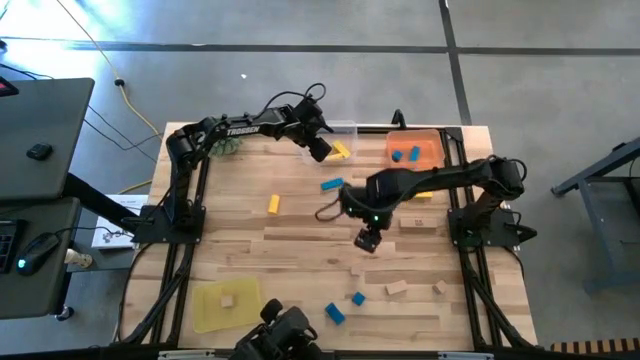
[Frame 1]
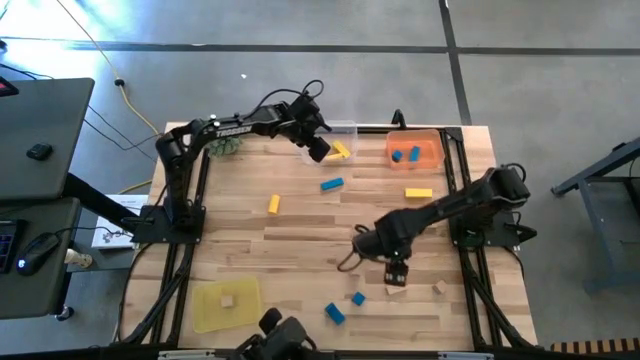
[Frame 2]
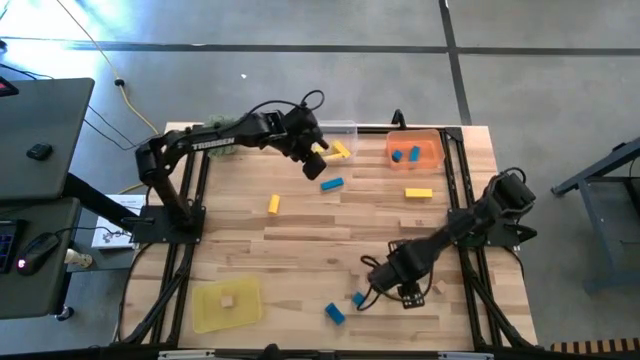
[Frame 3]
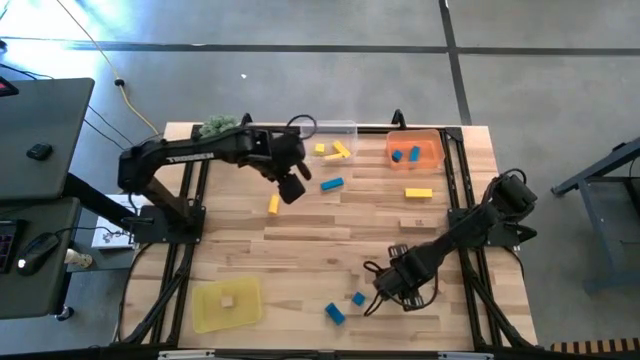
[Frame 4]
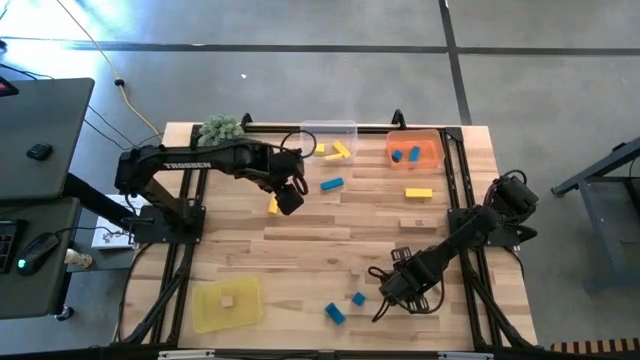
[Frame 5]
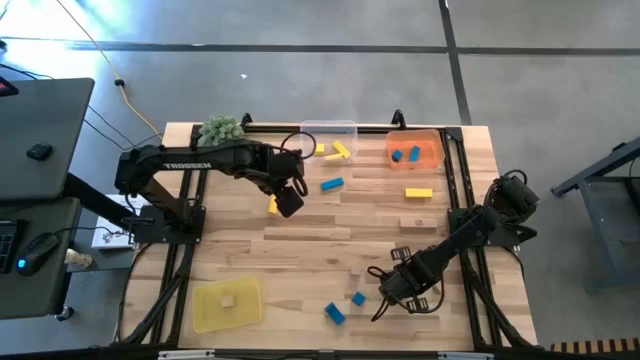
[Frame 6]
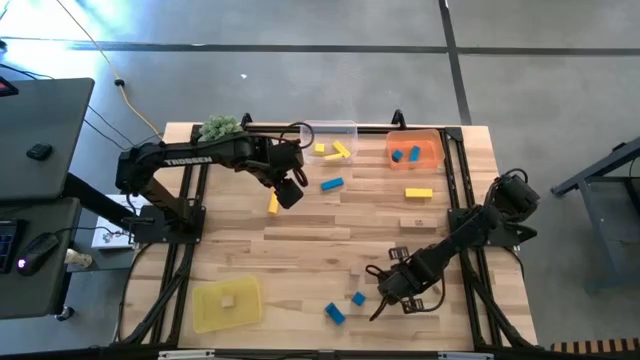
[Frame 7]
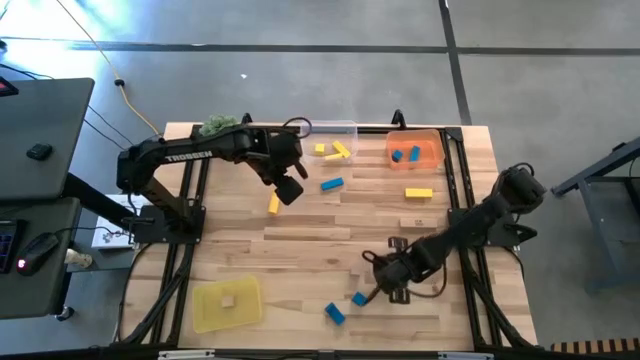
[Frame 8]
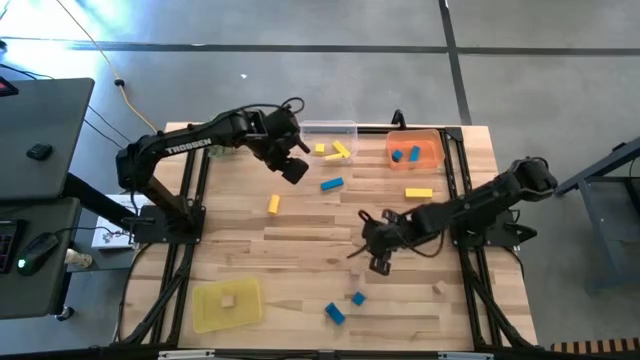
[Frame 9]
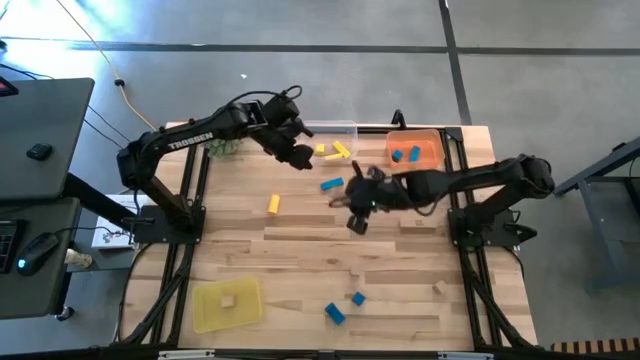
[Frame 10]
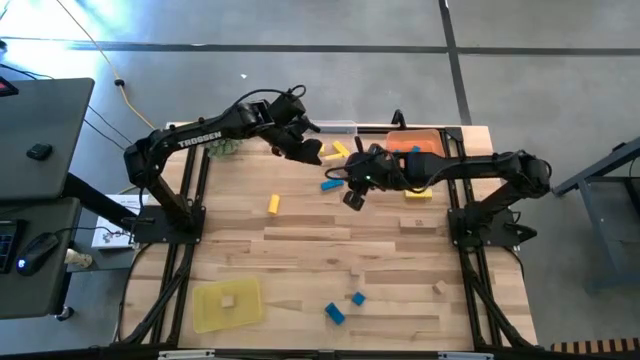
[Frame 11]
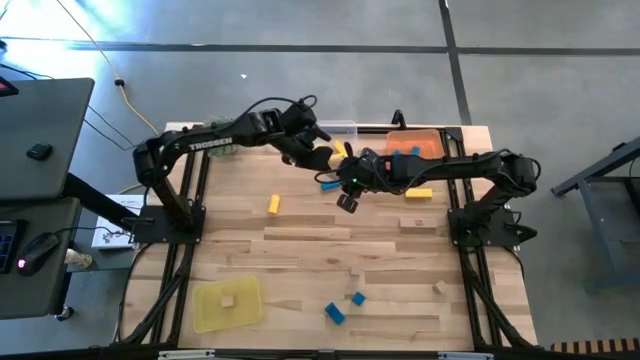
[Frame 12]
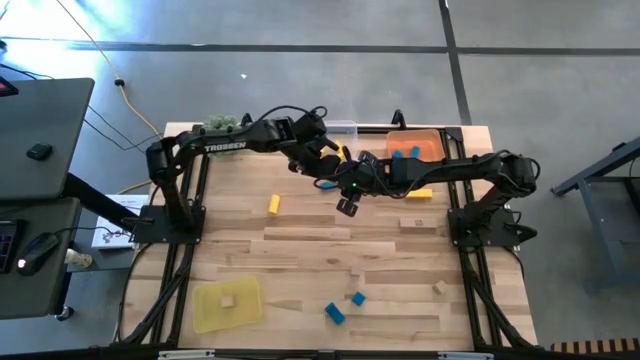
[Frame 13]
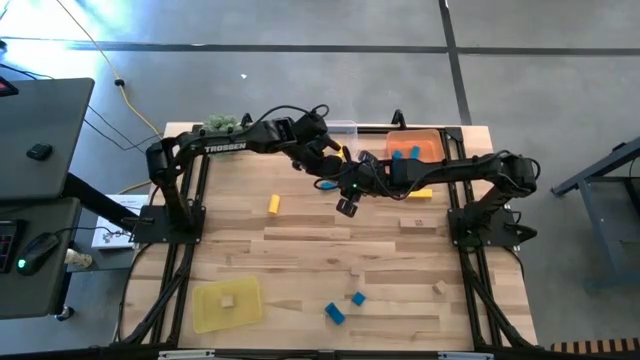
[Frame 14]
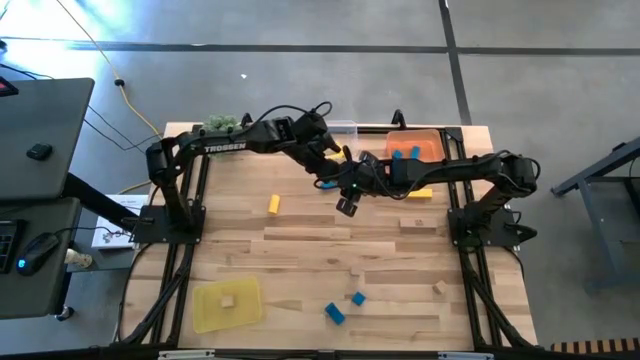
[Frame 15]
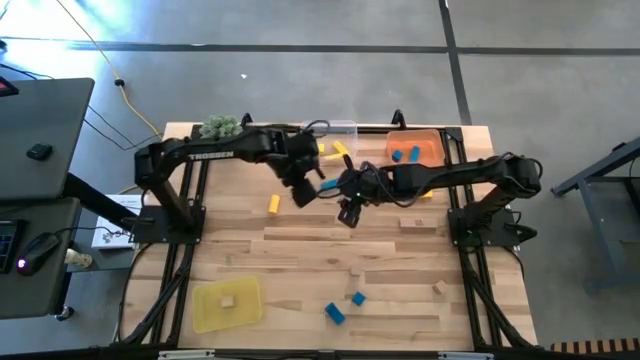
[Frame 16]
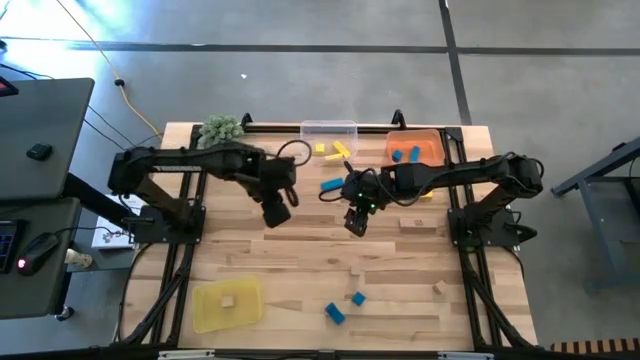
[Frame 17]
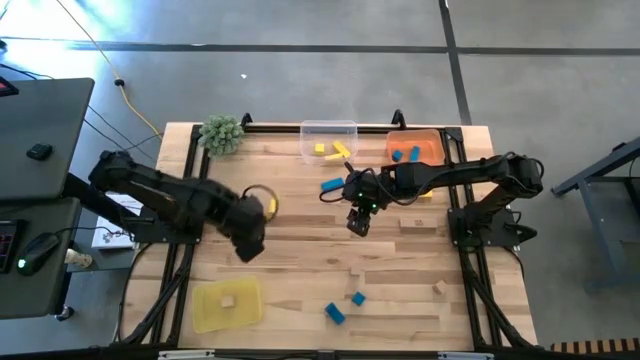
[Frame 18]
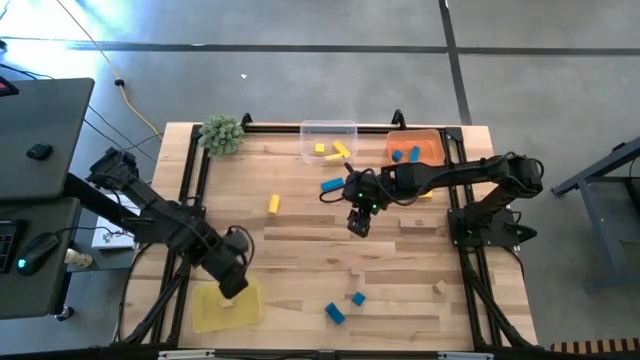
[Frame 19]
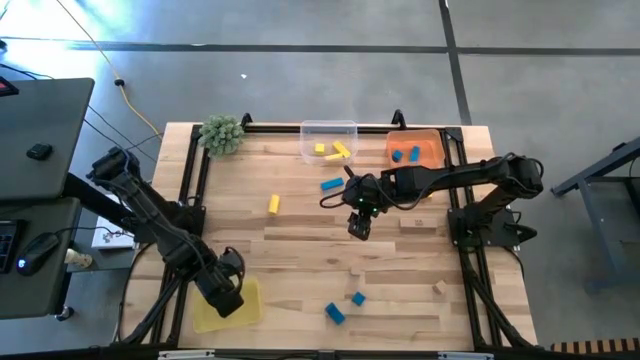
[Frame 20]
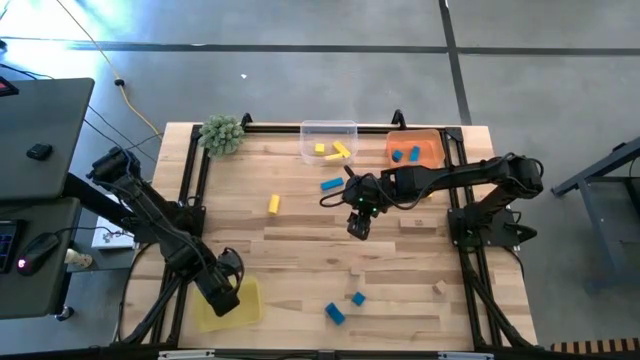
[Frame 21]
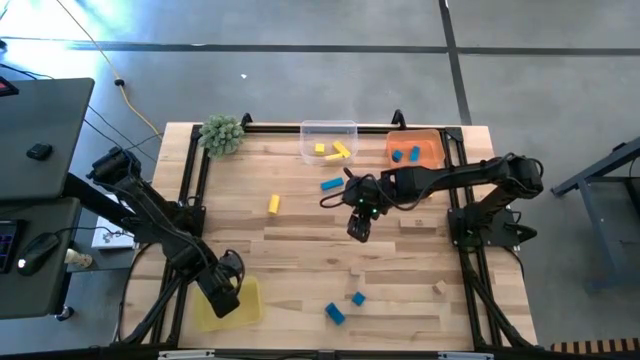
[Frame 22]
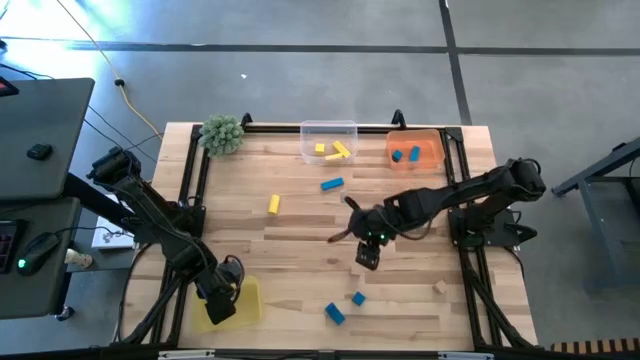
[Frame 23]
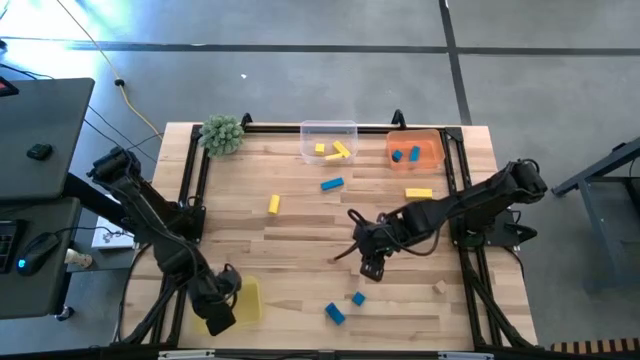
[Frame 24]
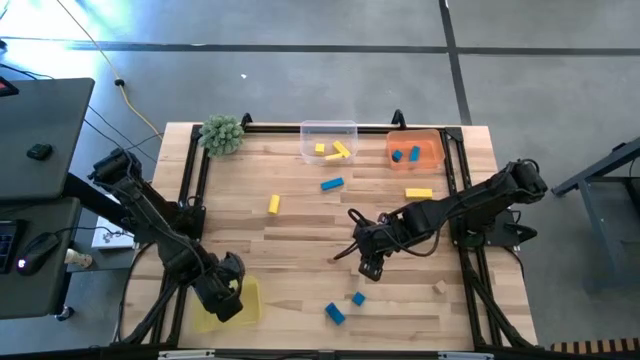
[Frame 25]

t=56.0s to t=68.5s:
Task: Sort & place blocks by color
Put the brown block into the yellow bin

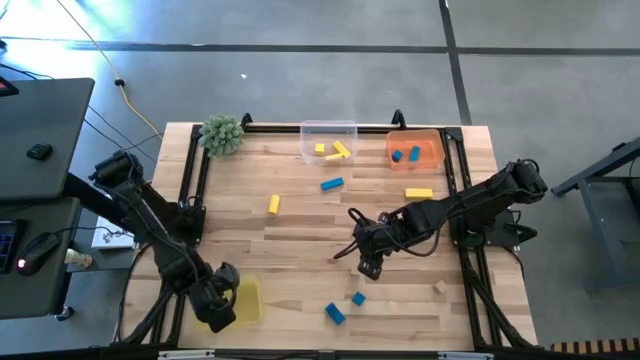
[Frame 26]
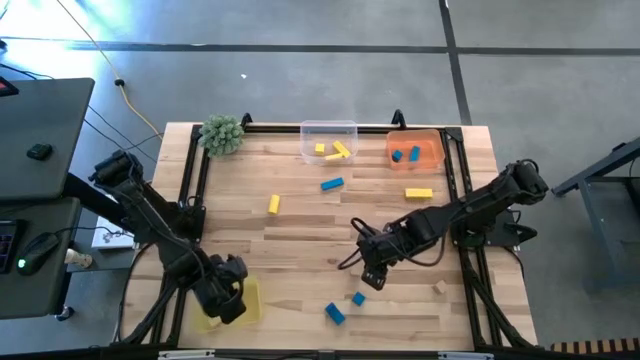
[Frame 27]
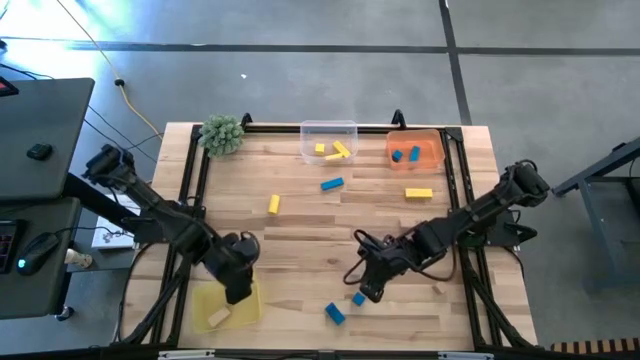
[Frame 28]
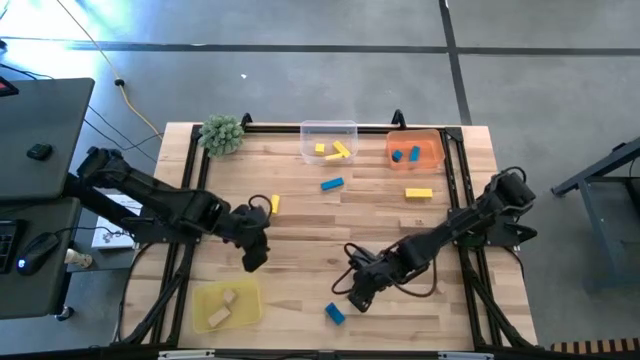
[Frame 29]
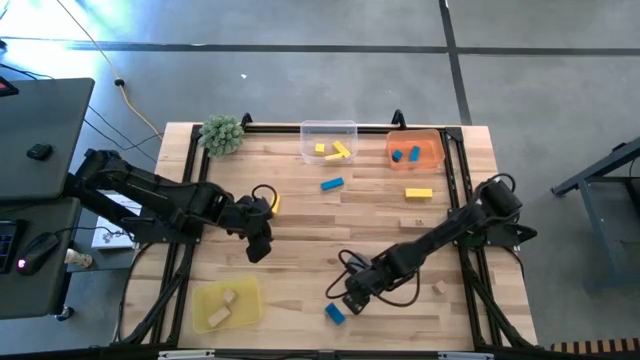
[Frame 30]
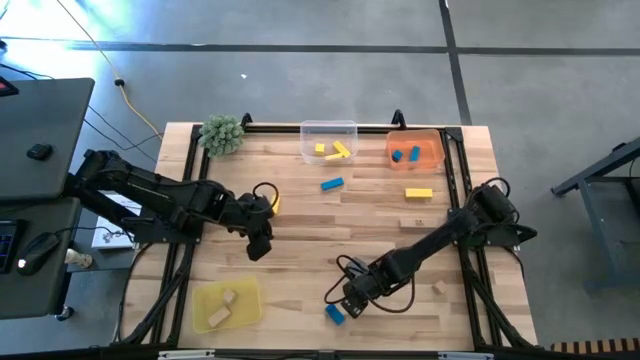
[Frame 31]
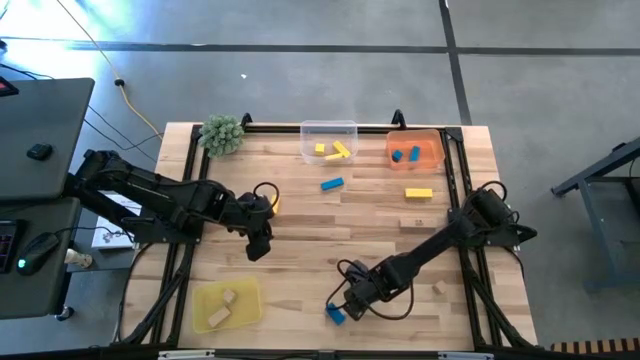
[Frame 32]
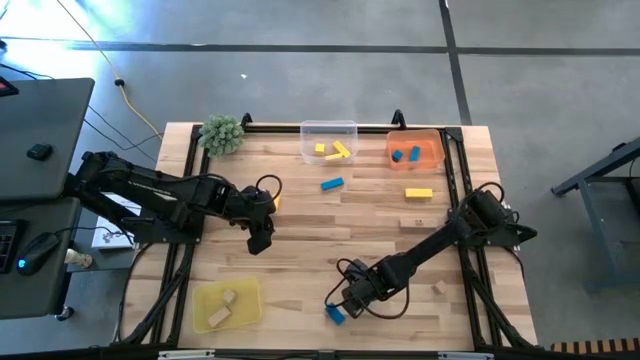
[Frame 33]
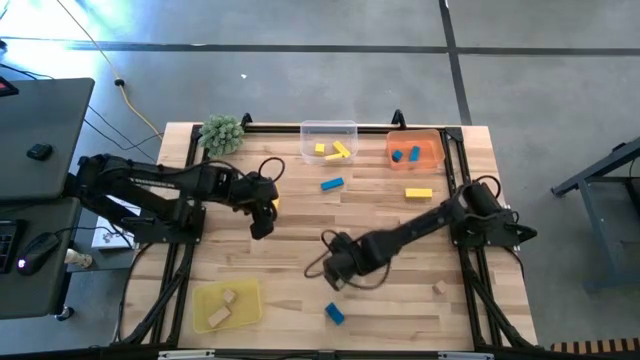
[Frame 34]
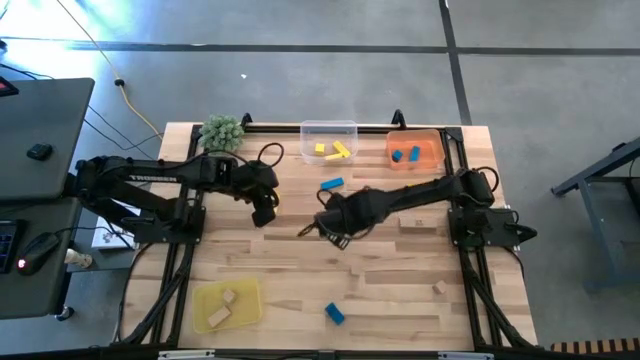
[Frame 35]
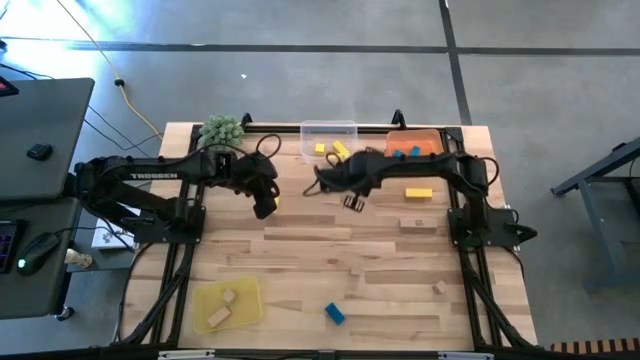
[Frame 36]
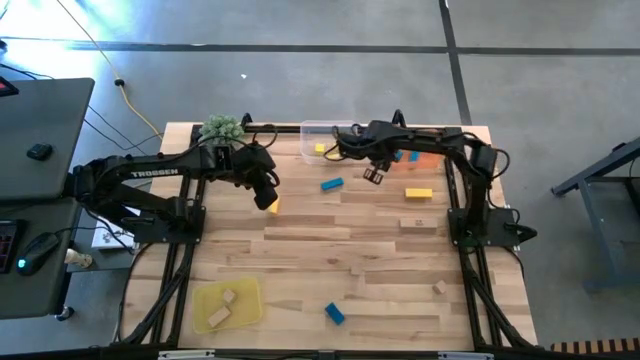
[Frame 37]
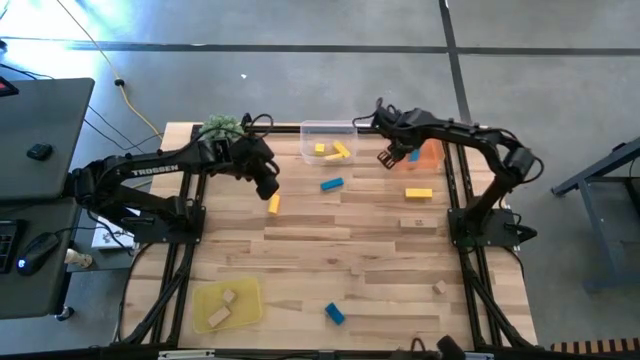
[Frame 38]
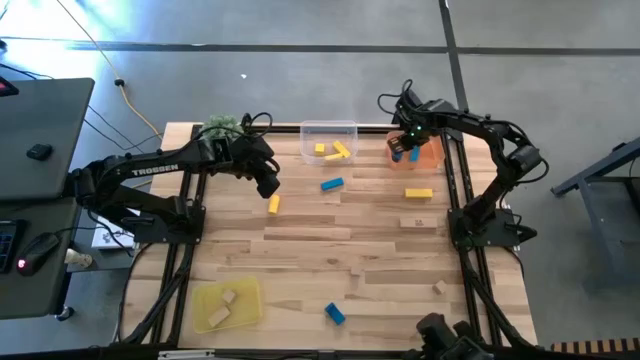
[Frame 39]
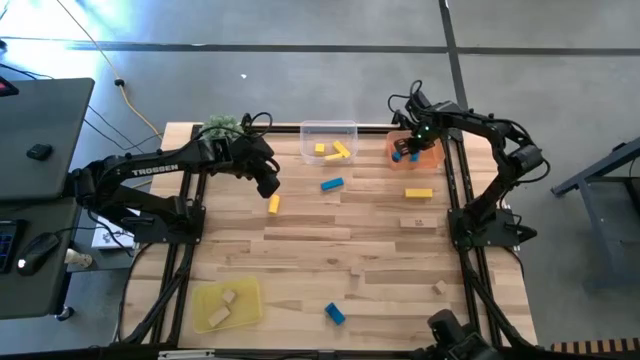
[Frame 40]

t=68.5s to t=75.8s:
Put the blue block into the orange bin
